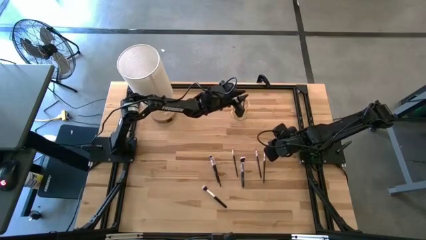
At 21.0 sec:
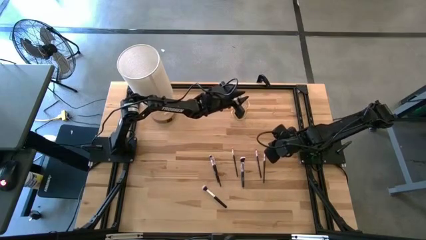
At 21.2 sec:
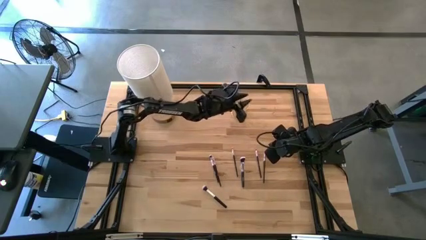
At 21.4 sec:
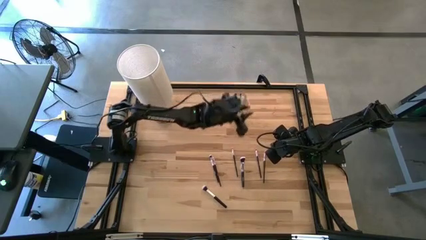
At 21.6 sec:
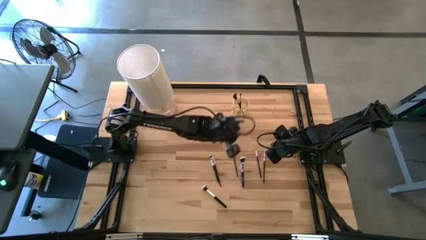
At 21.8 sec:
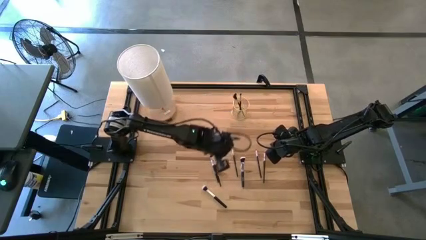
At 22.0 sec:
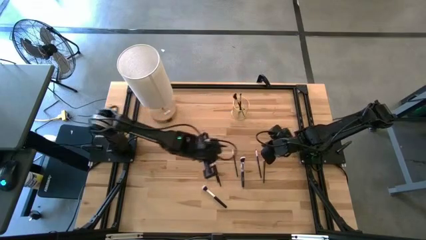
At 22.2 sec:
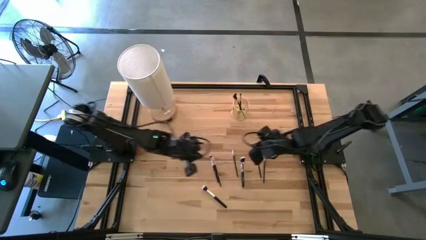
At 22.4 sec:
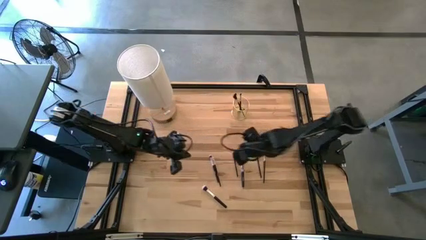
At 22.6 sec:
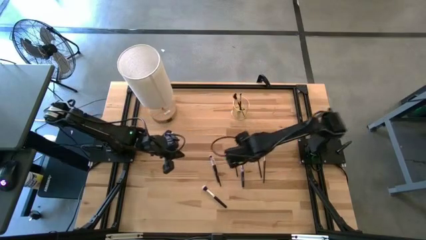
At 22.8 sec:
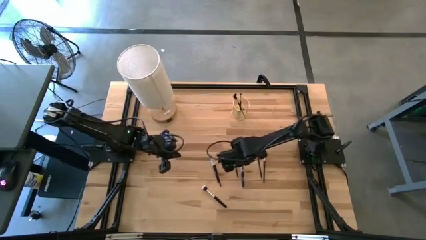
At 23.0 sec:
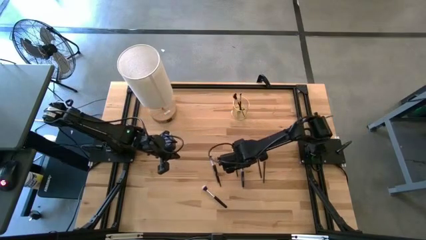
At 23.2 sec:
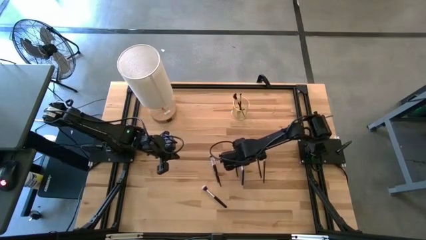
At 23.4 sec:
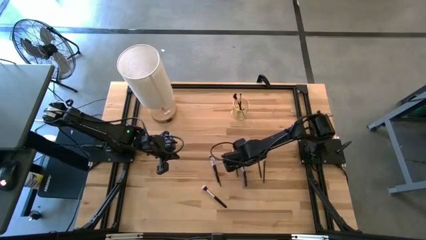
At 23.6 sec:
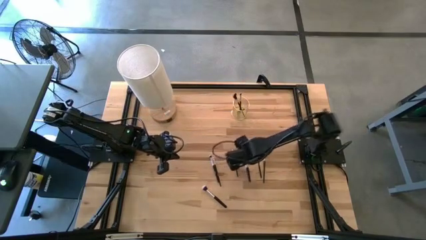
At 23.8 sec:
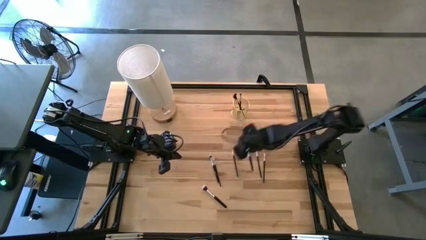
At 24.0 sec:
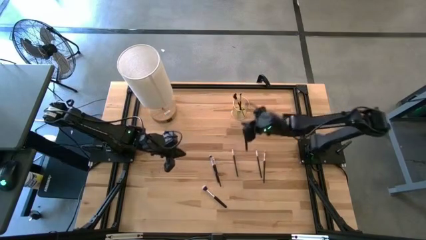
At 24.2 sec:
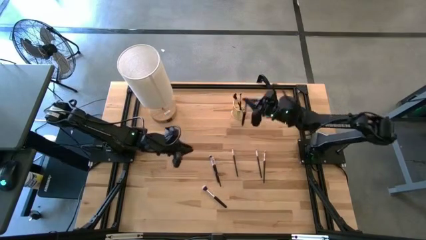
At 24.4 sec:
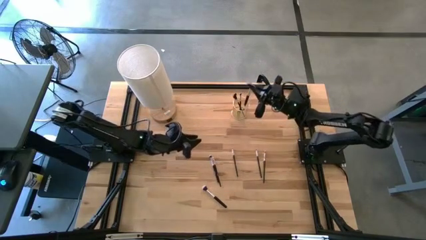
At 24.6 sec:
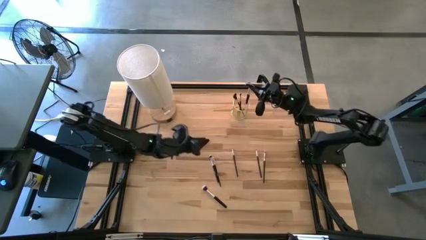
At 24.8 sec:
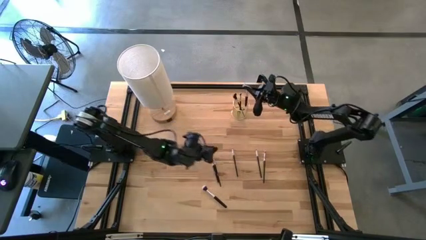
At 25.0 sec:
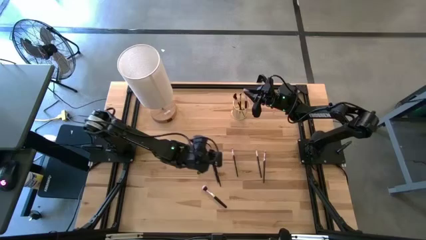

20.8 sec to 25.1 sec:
Task: Put items in baskets/containers
Put the silver blush brush into the yellow container

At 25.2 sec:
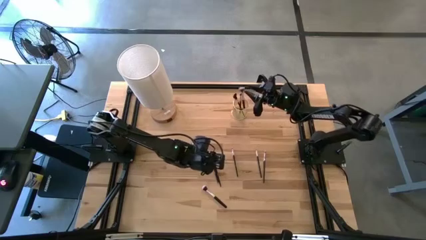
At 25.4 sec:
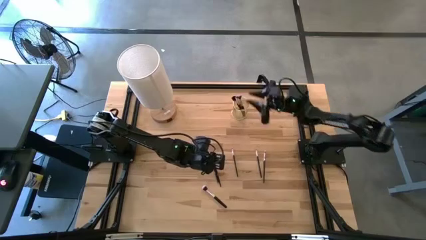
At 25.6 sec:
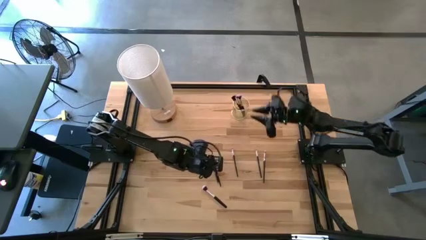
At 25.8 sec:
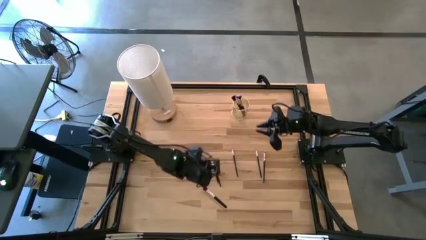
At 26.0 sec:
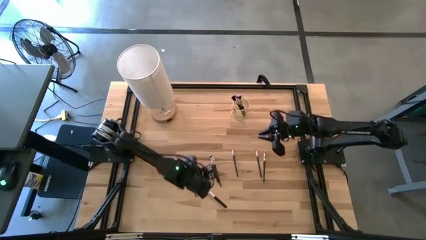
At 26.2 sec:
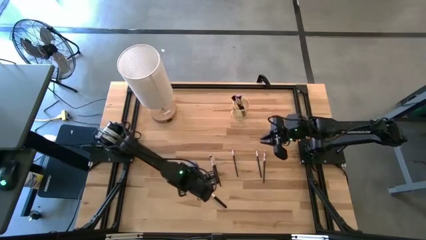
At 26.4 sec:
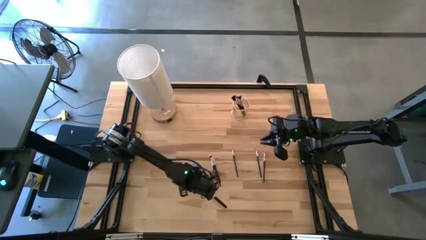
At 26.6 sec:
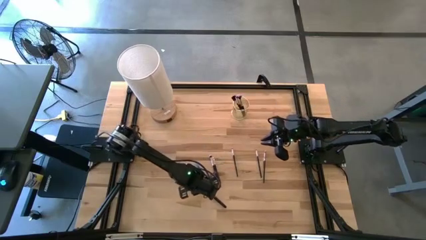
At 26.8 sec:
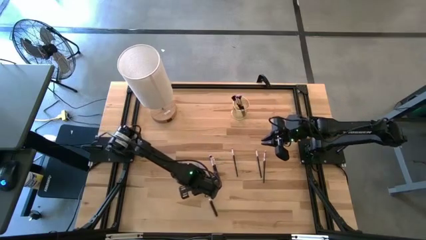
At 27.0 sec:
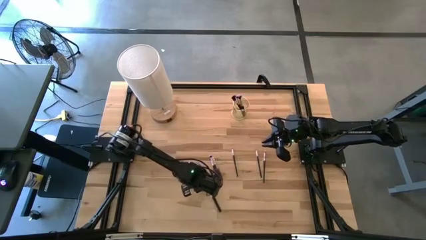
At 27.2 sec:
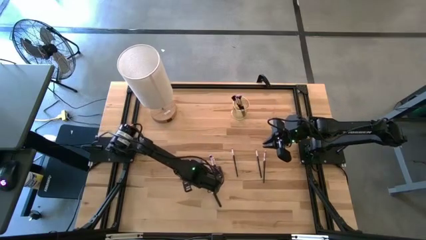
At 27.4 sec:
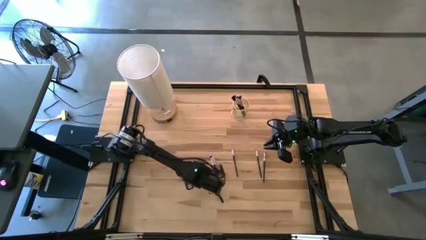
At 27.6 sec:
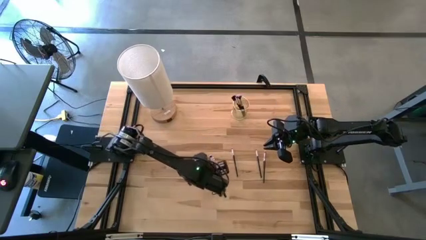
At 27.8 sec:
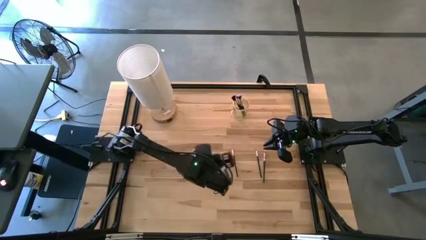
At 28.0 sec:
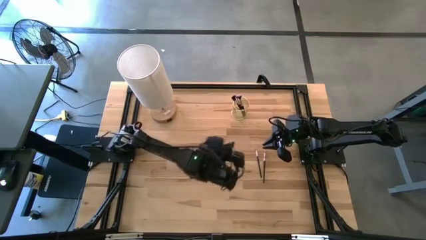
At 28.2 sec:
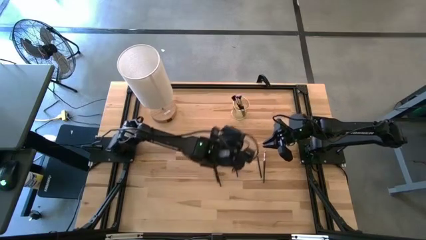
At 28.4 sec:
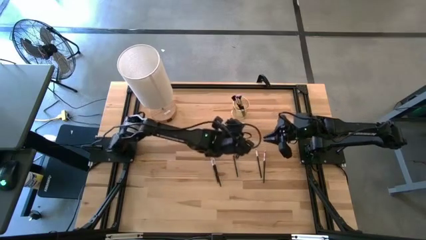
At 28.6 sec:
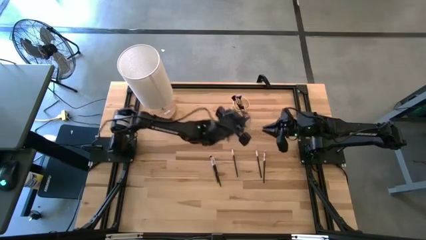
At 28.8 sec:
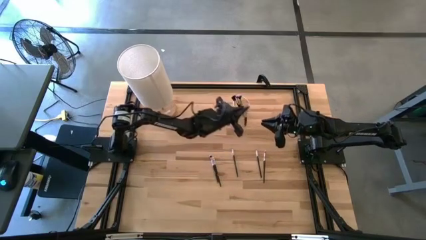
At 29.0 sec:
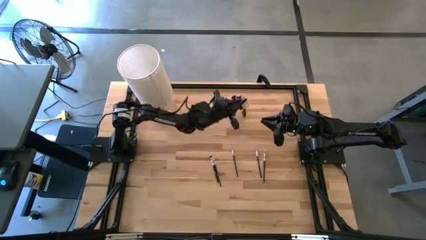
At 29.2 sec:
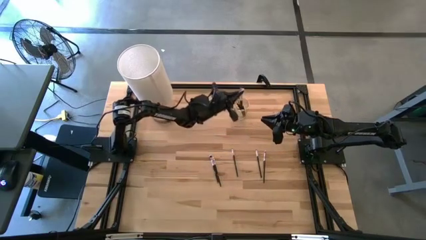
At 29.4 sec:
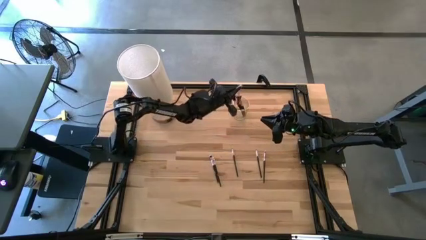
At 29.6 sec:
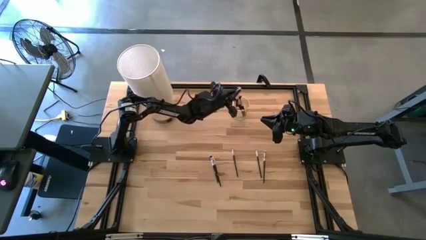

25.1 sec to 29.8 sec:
Put the silver powder brush into the yellow container

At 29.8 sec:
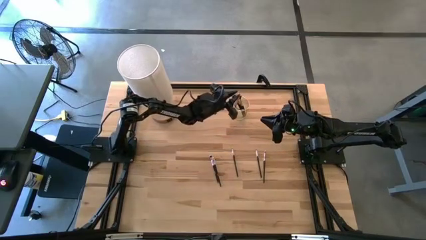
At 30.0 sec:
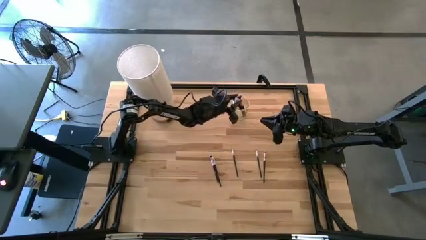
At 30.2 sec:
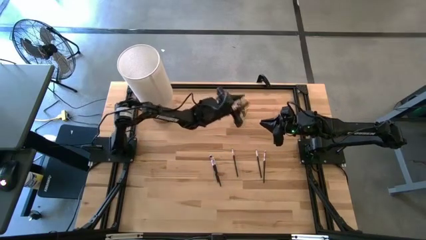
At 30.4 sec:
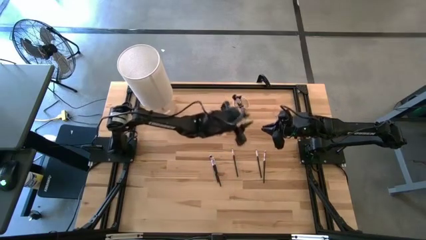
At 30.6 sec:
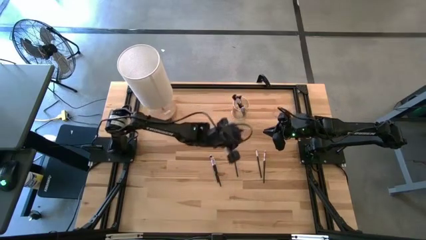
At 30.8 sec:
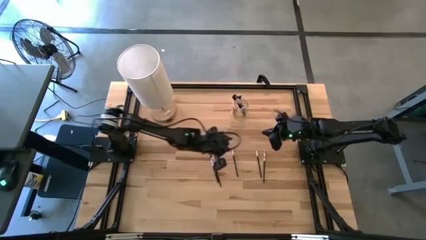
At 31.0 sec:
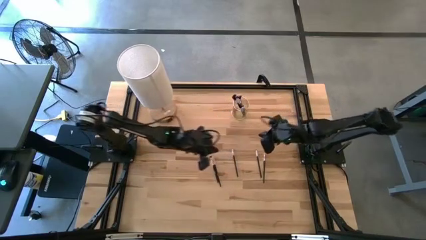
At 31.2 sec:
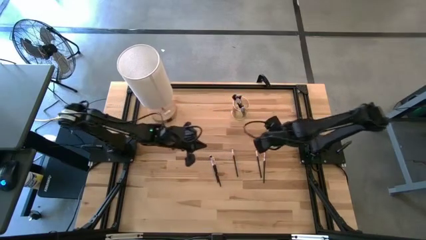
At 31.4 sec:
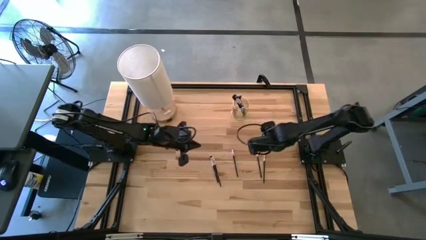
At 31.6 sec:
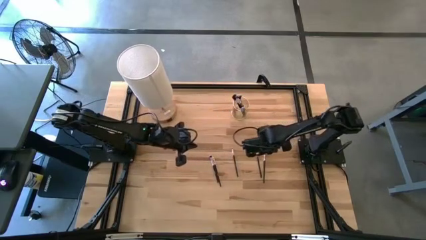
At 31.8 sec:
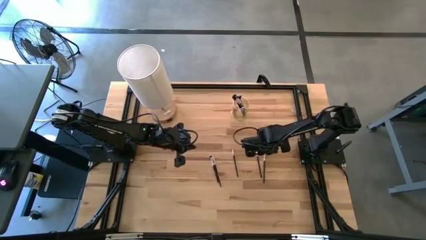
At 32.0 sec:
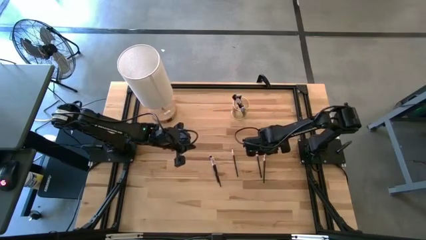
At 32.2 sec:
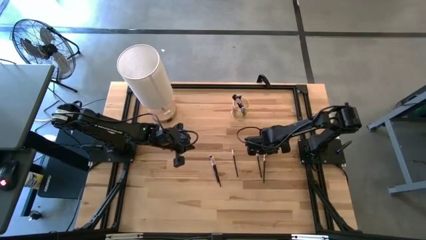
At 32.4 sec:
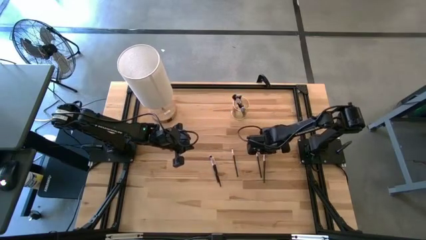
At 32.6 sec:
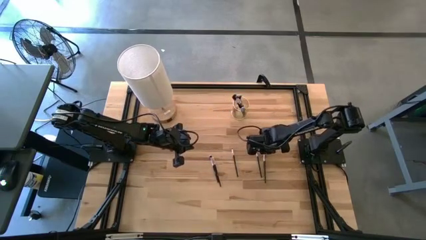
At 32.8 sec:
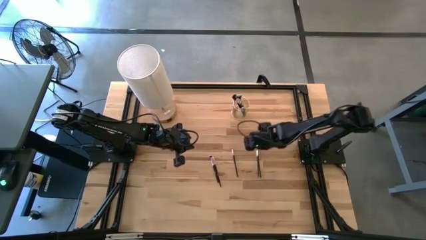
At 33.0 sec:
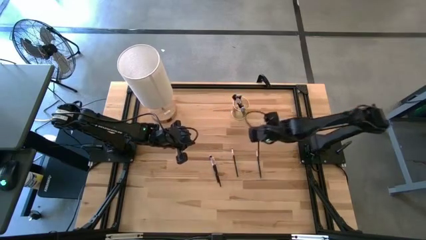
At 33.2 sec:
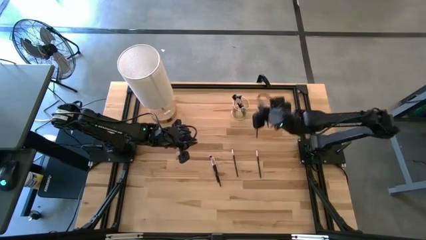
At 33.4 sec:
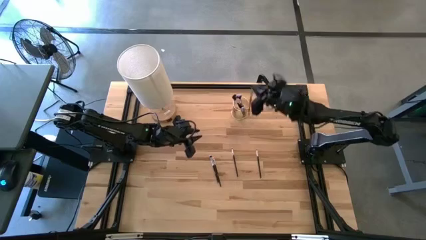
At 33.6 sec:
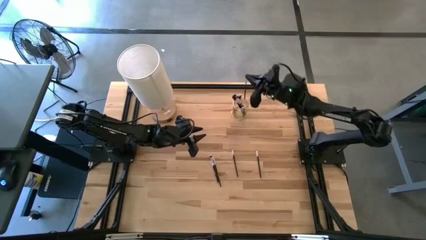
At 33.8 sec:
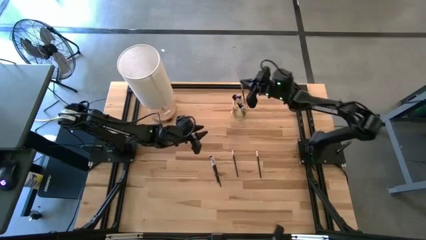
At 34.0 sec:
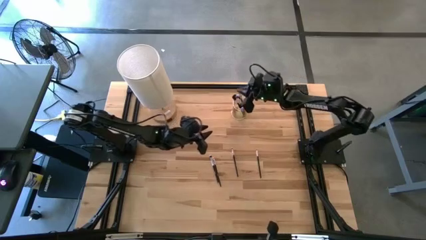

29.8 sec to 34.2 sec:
Put the silver eyeshadow brush into the yellow container

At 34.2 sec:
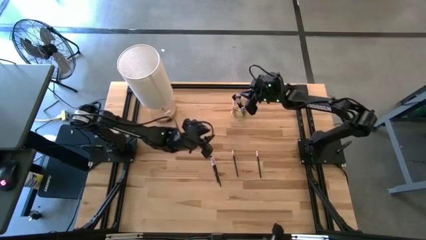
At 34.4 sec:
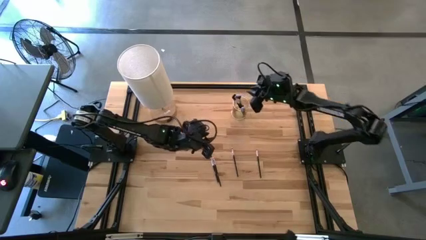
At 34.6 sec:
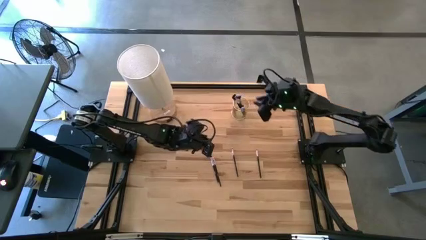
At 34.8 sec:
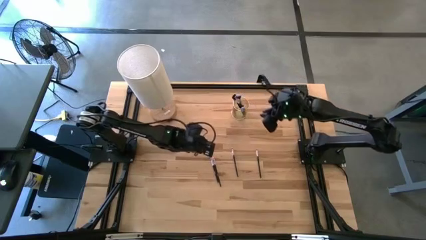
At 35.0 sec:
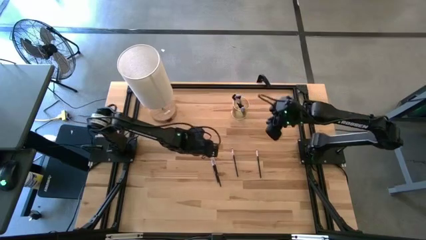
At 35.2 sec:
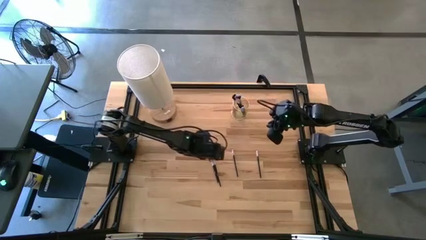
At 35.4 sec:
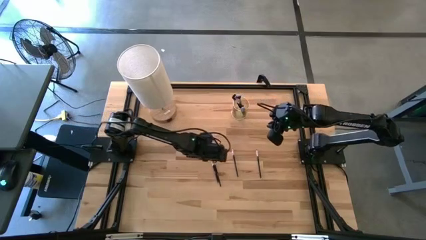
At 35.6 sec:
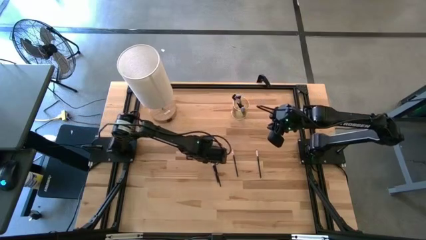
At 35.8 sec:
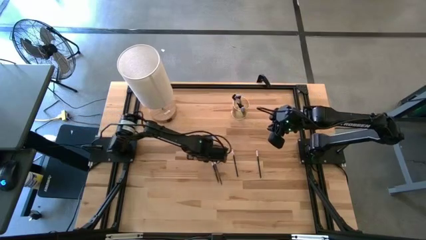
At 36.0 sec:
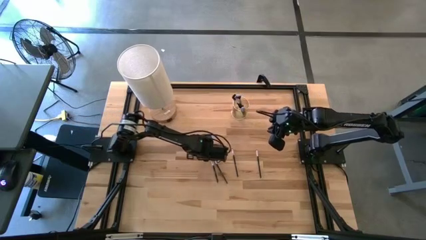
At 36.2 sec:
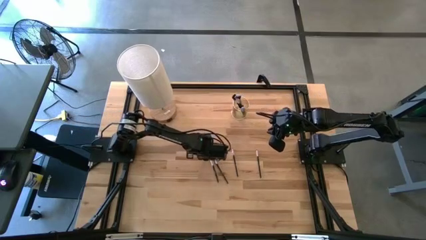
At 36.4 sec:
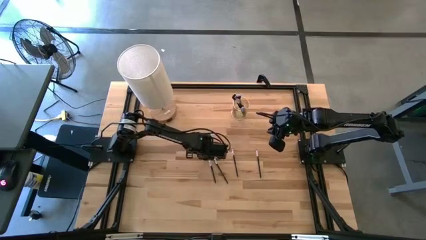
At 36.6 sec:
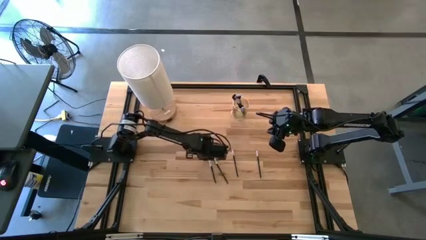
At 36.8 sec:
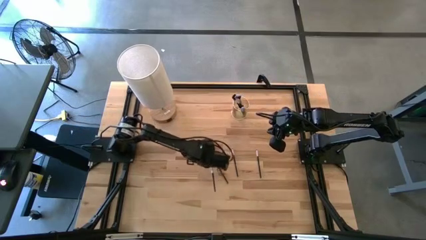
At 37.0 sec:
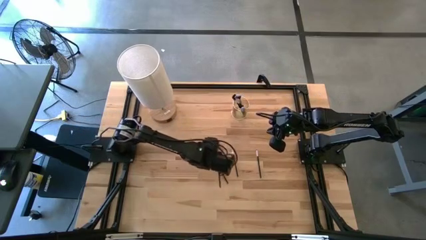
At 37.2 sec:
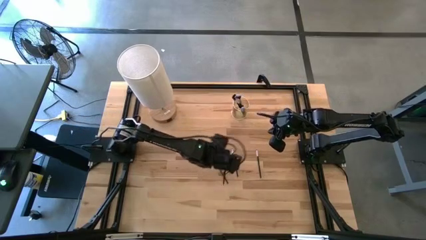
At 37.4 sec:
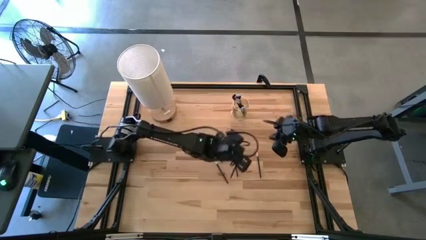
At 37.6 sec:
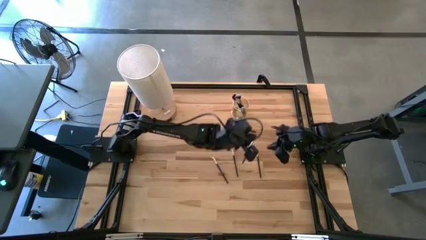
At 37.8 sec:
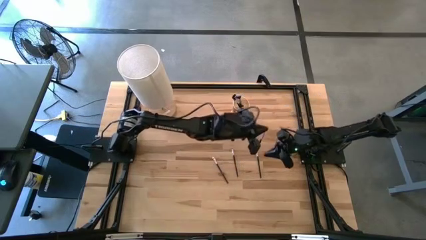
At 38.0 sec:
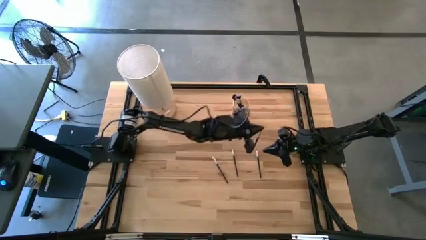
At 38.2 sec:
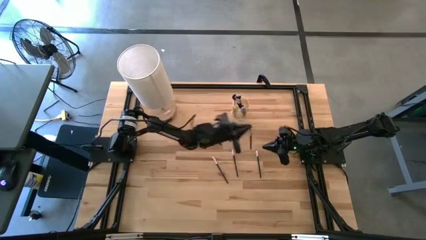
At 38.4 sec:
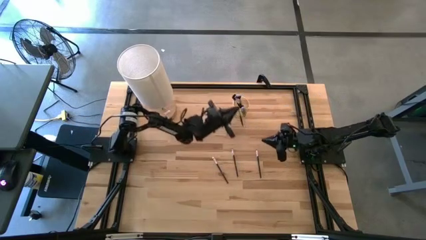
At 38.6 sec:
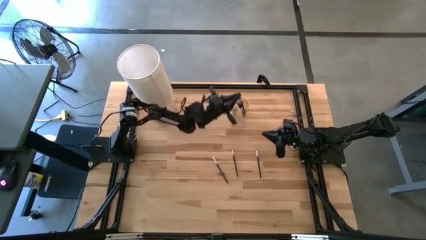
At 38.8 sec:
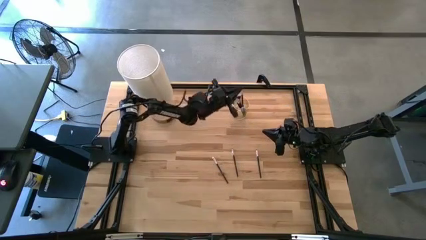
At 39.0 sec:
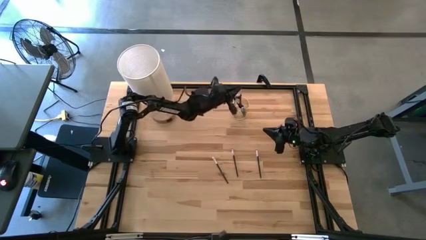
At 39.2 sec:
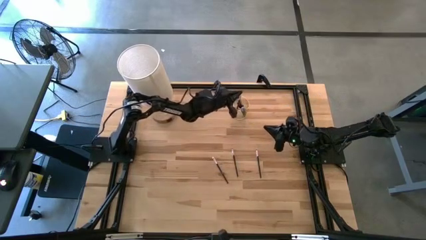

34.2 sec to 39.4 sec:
Put the silver eyeshadow brush into the yellow container
